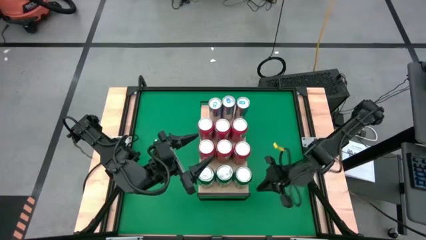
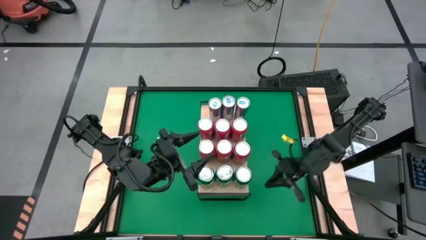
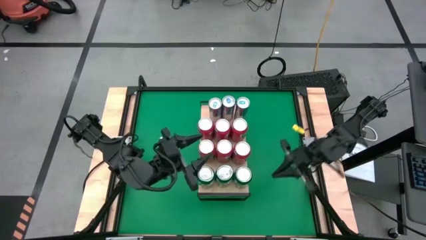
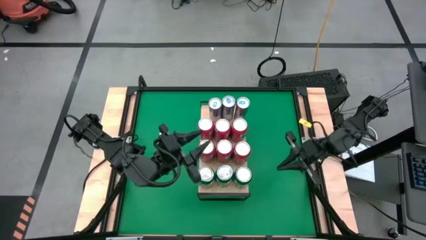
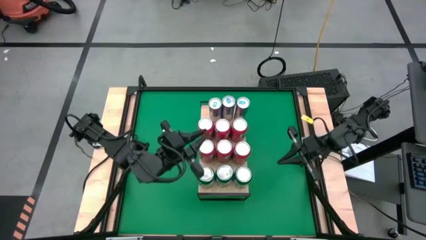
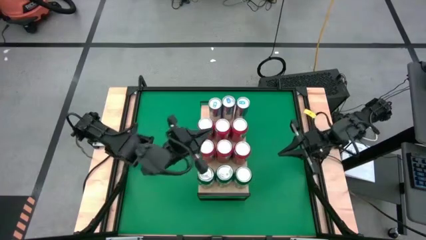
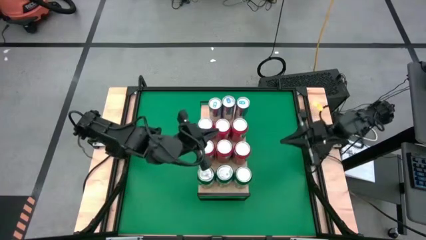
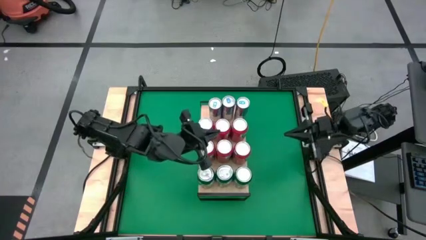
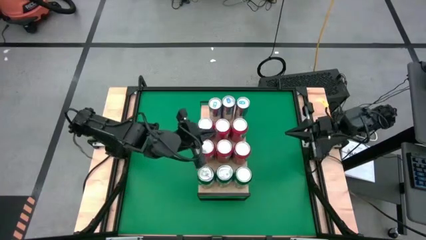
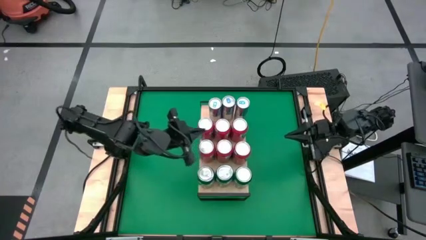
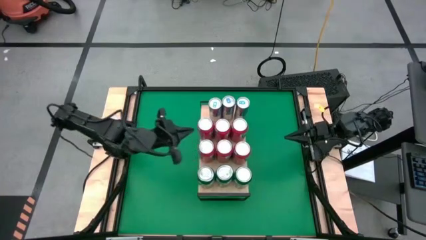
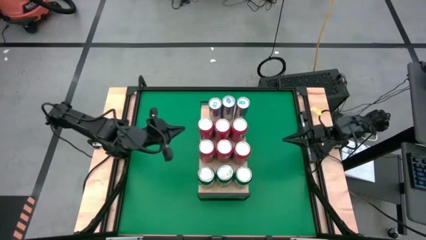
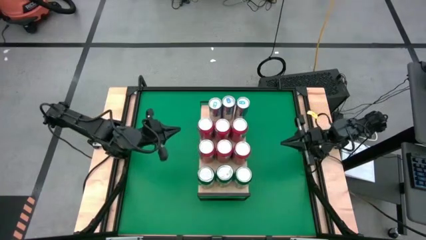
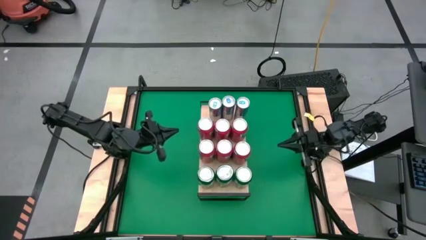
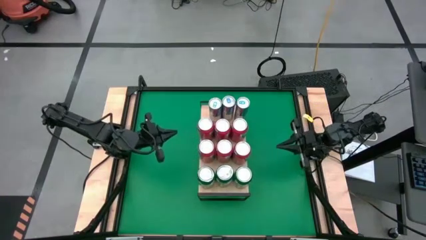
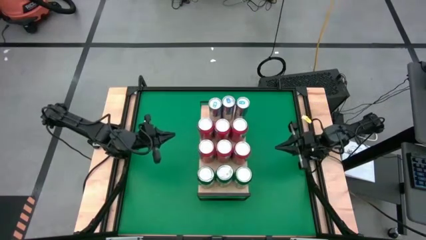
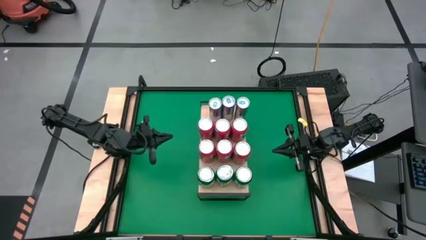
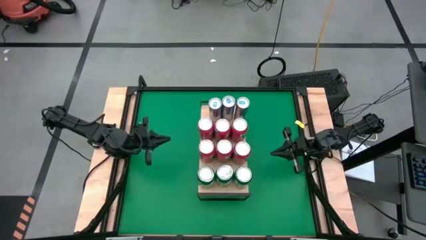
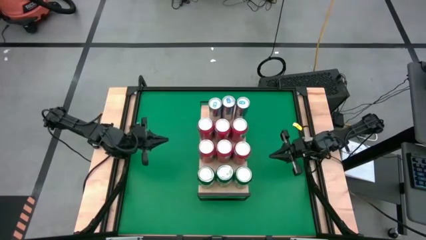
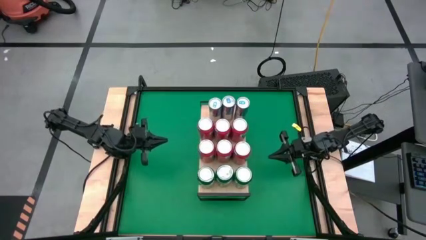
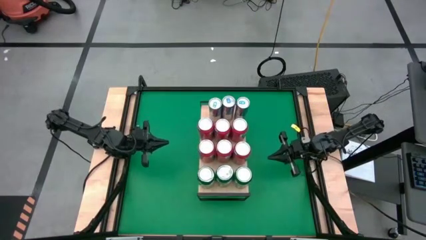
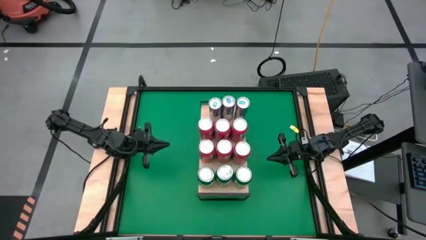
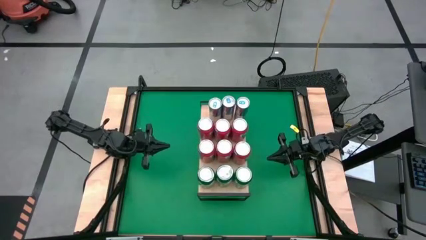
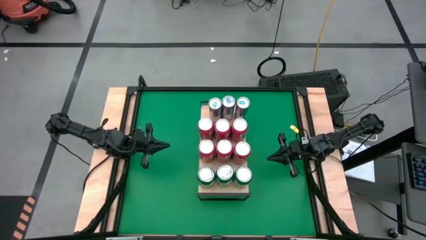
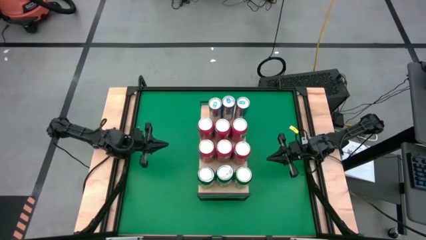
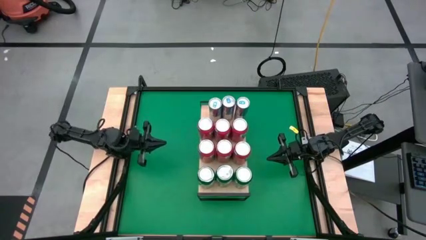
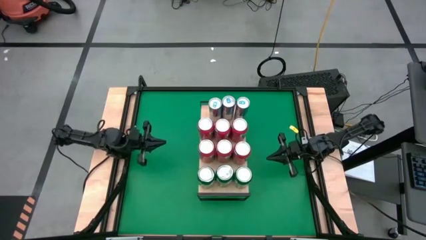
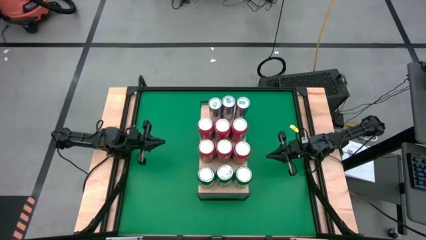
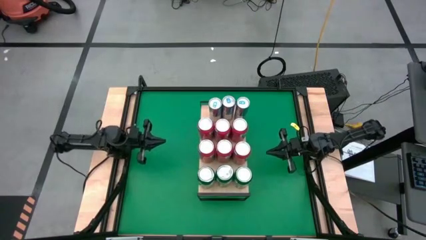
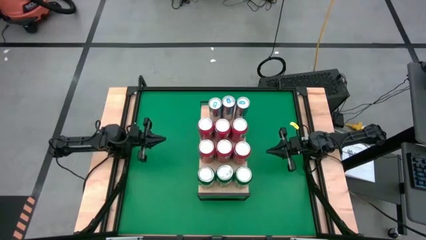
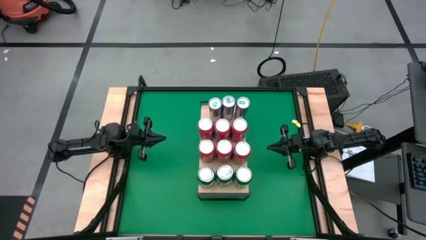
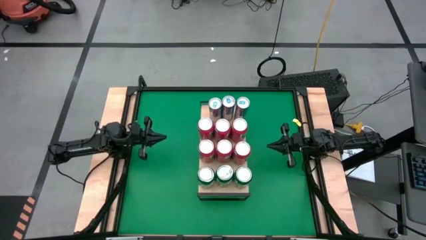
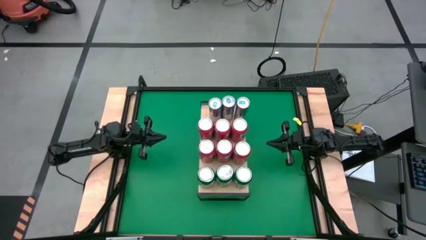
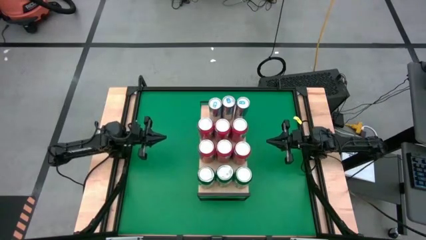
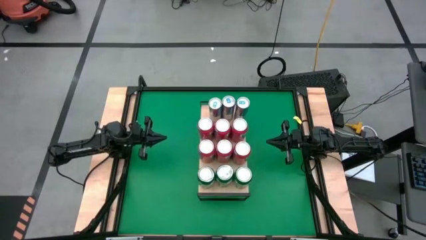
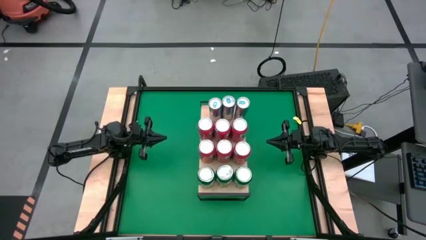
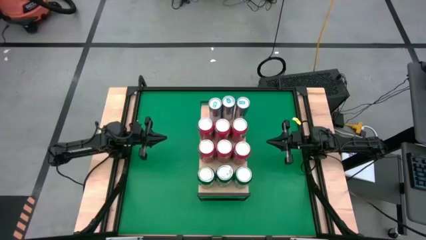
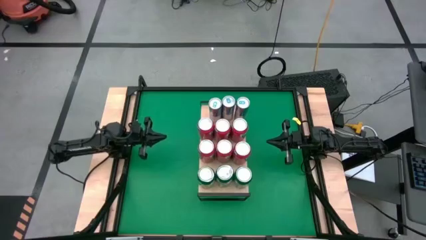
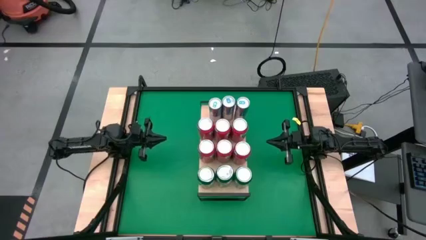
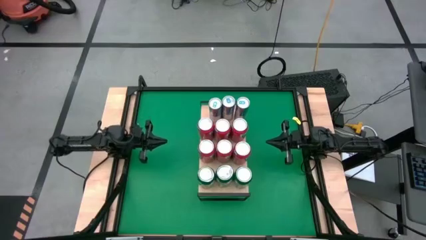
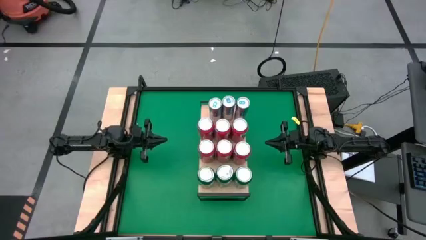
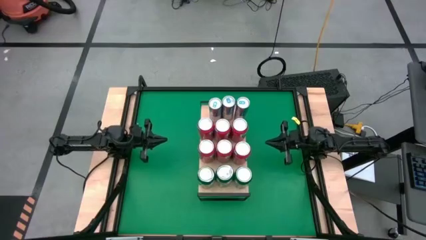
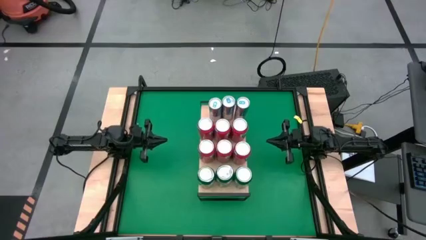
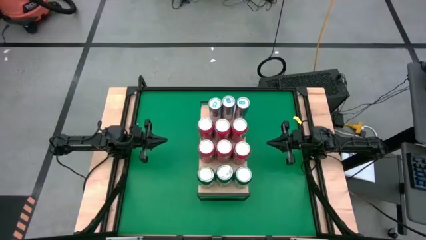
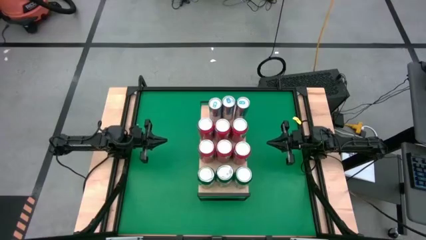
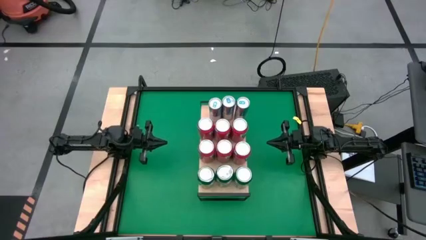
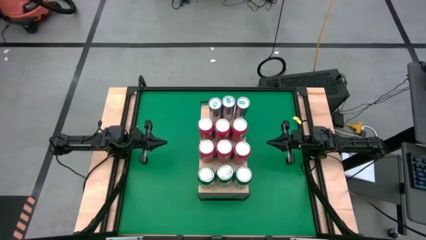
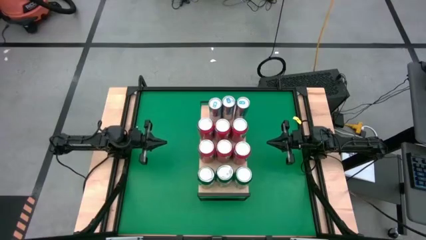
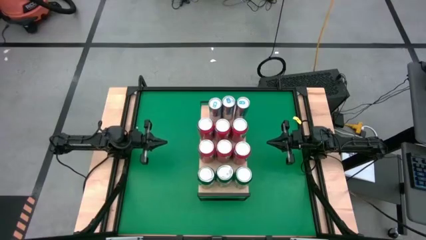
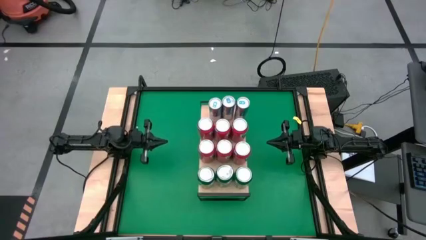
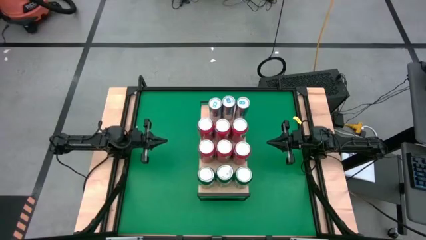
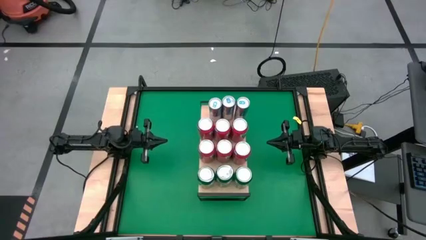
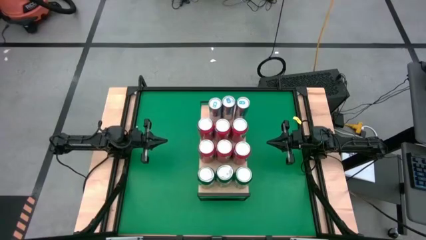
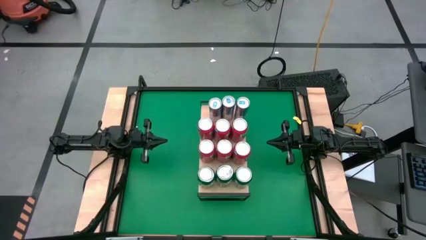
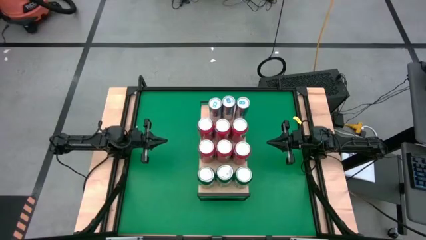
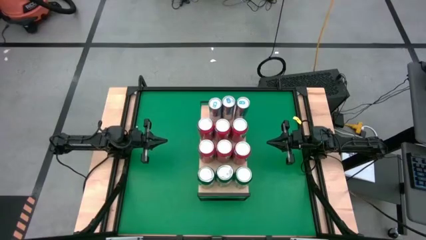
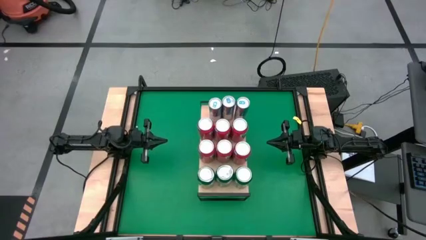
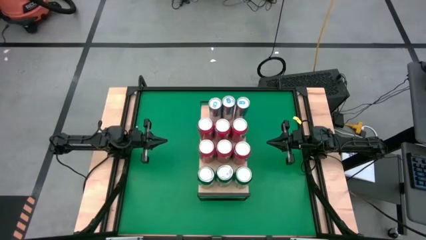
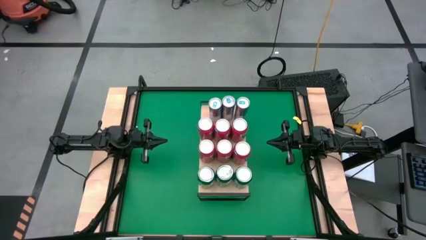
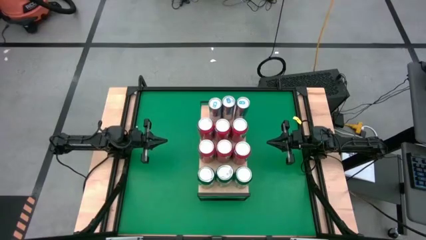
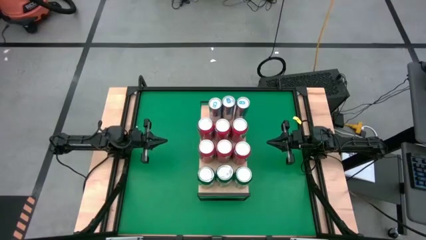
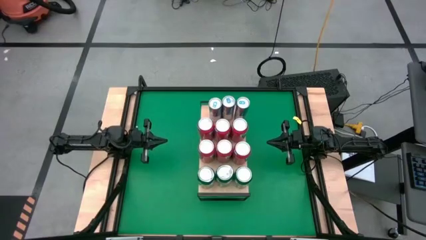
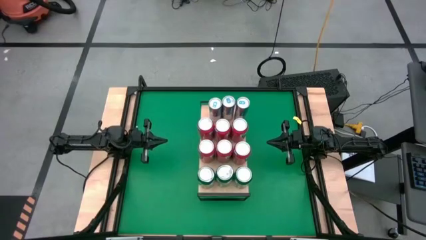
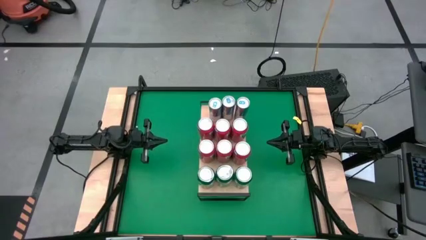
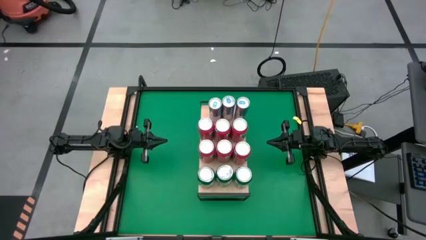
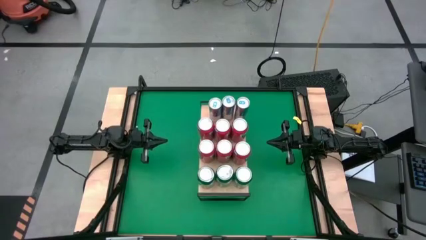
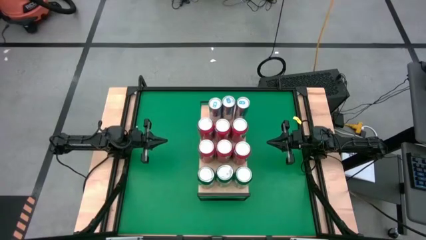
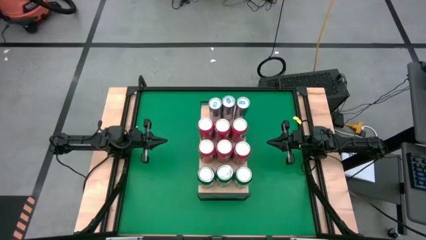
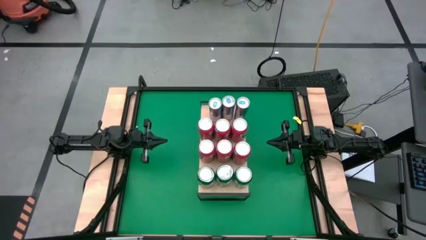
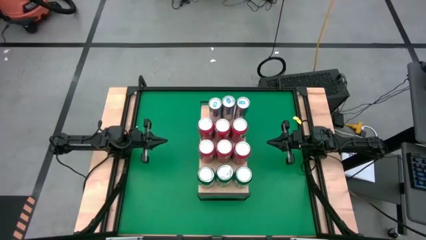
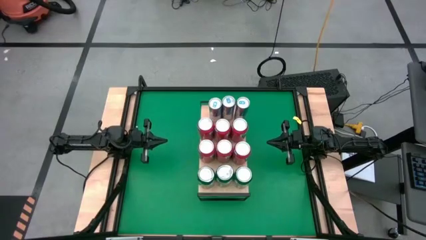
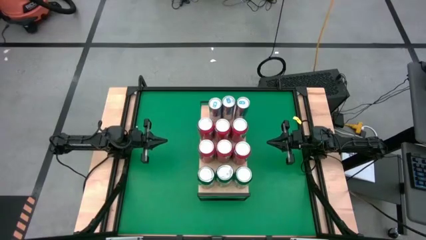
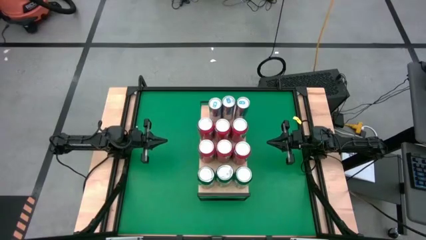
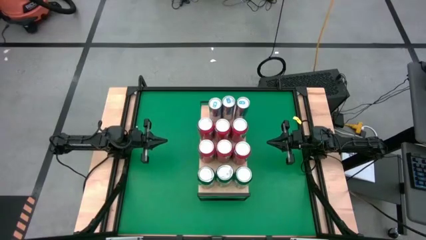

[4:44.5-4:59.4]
Task: Place canned beverage on shelf
Return to Home Position

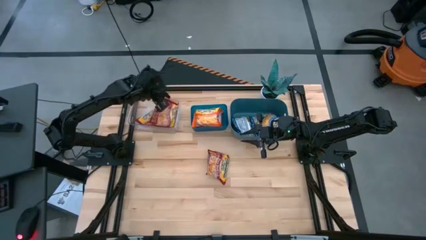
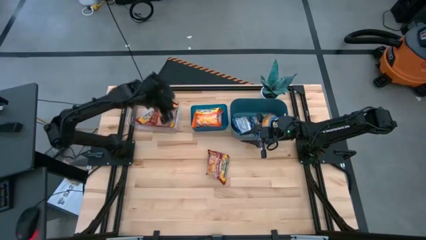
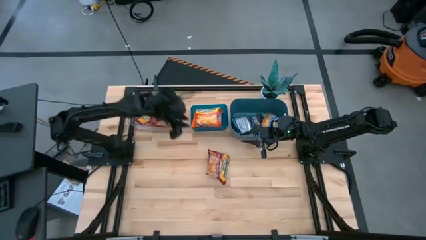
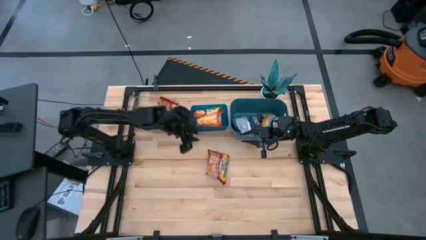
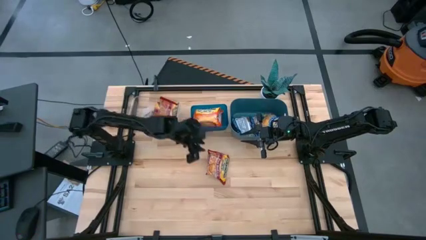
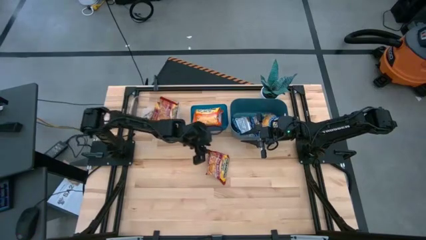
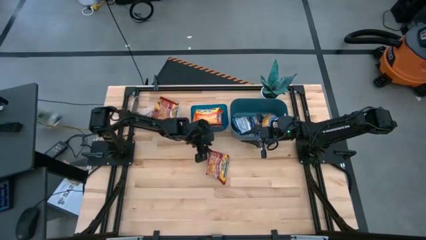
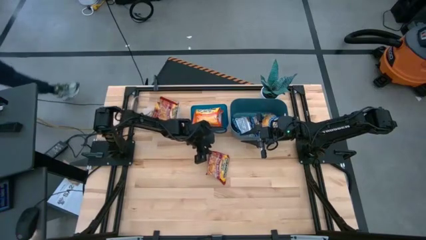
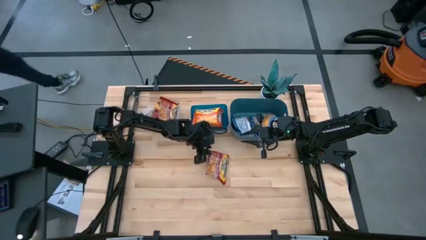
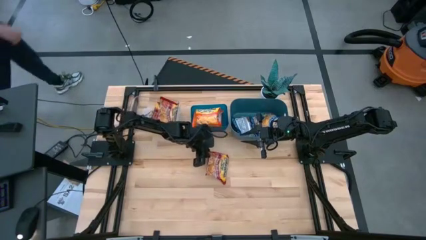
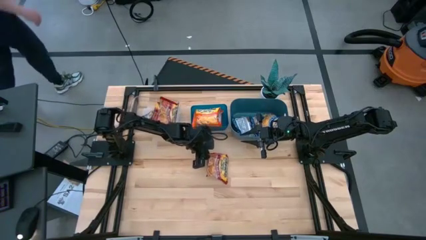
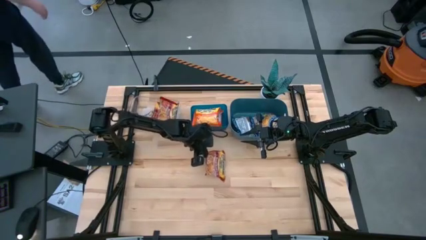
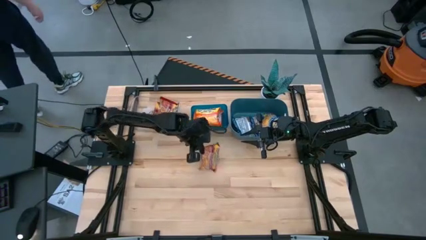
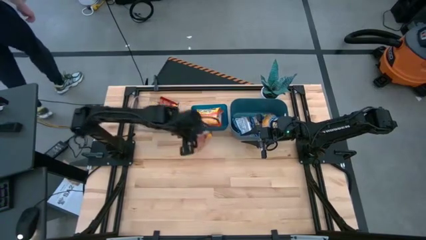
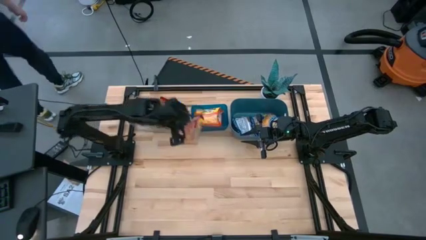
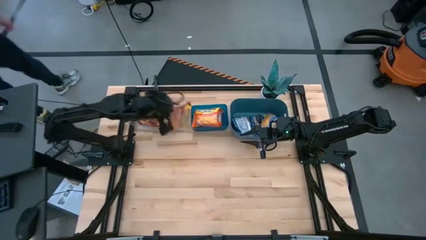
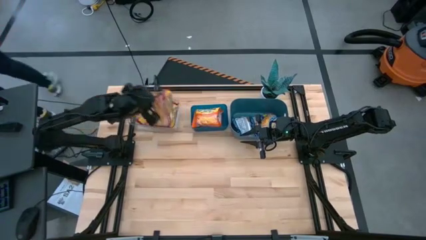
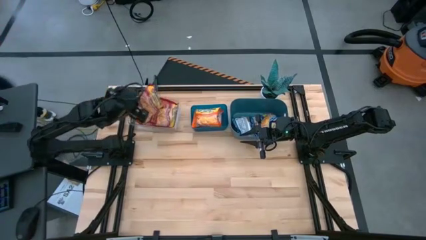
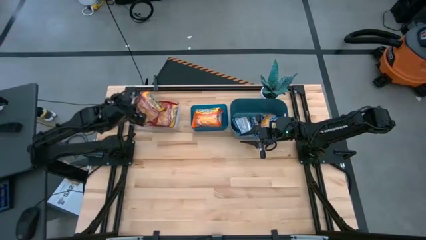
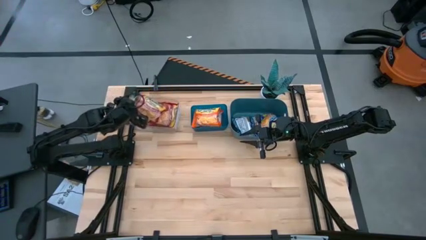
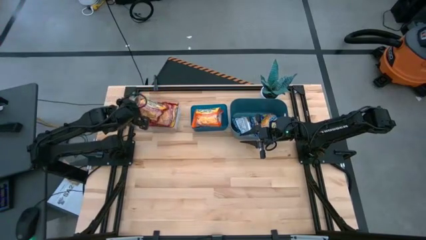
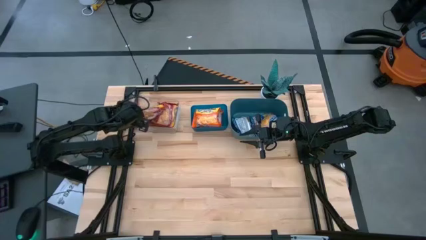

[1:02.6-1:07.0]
Task: Sort Maruchan noodles
Put the red noodle pack into the transparent bin
